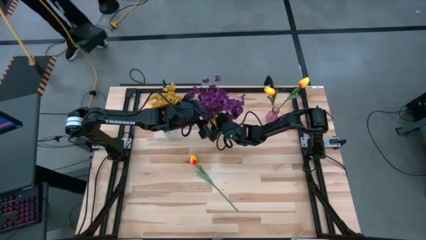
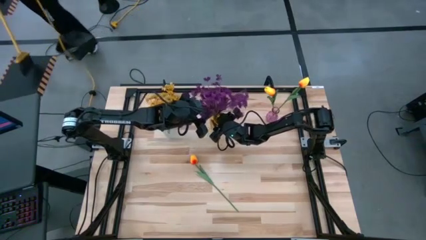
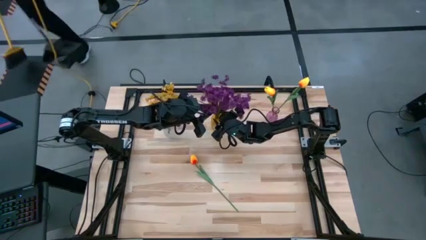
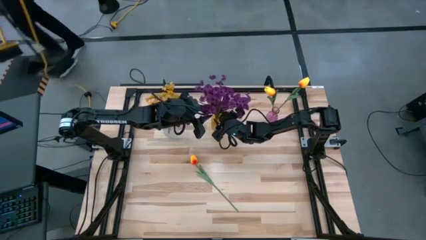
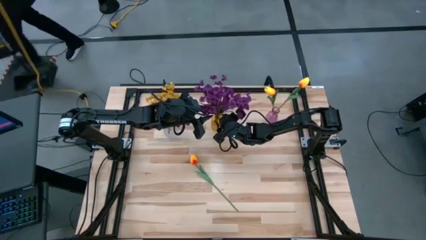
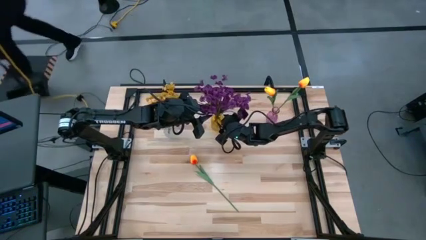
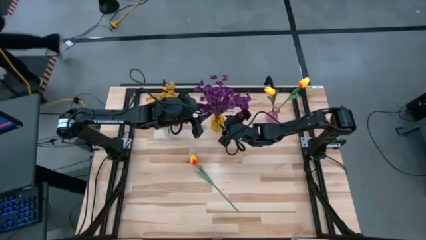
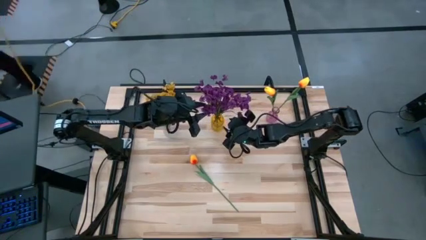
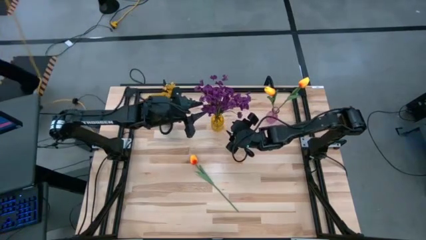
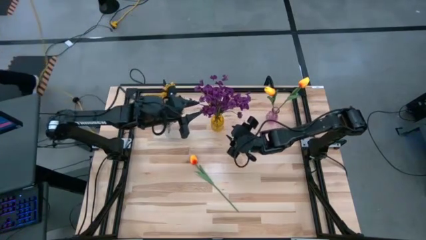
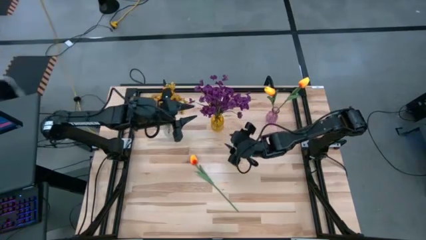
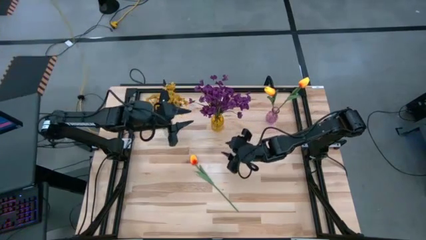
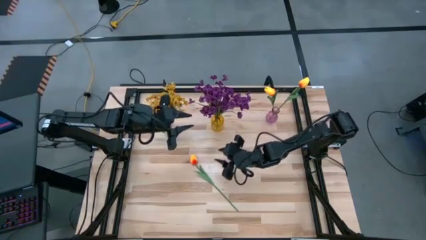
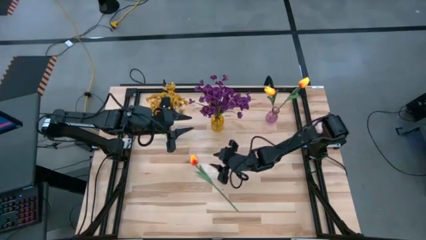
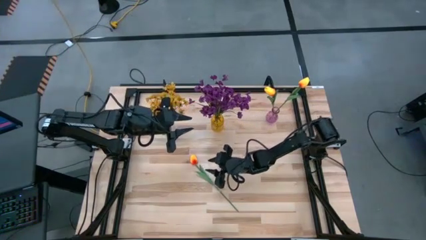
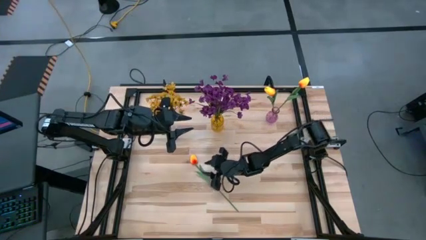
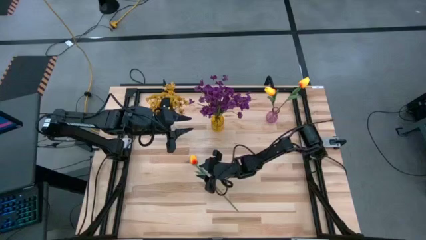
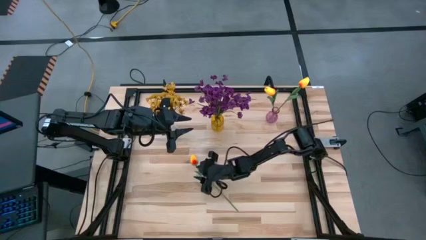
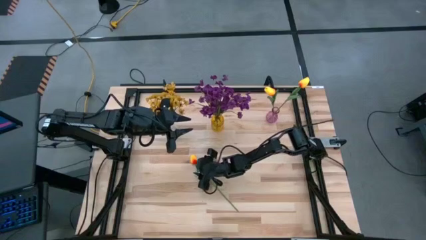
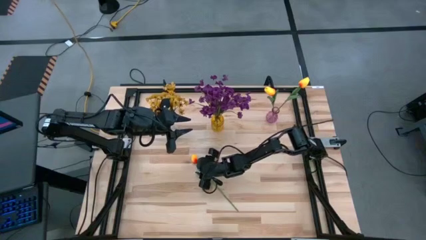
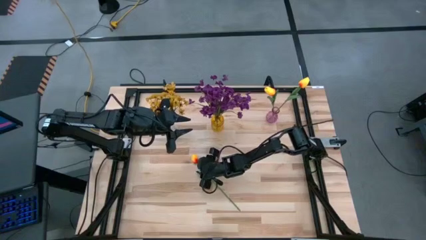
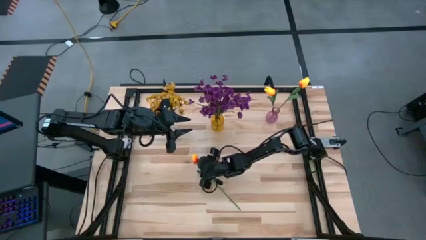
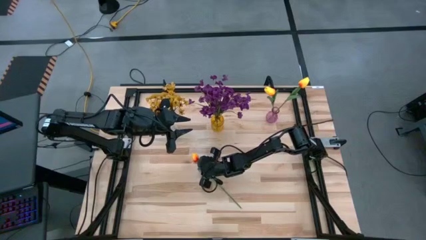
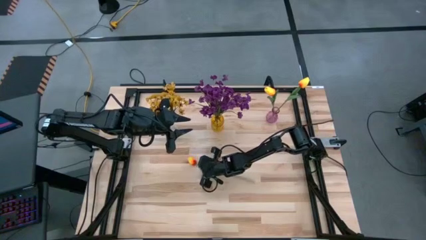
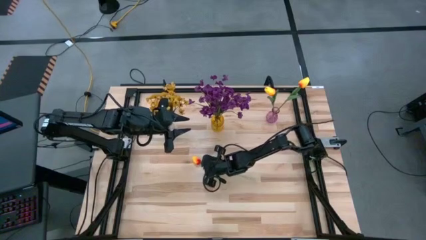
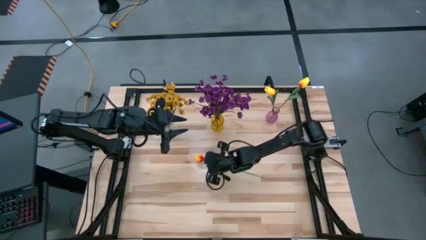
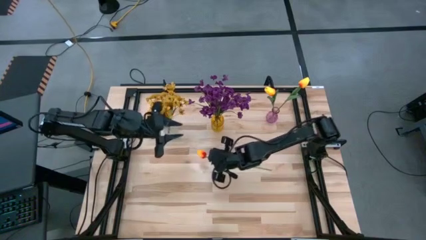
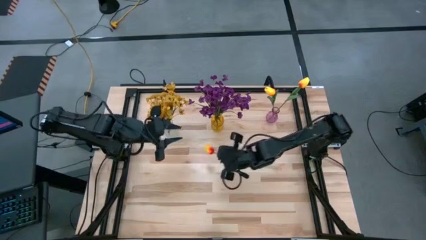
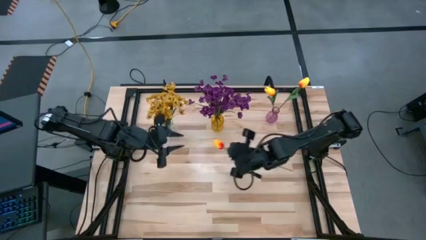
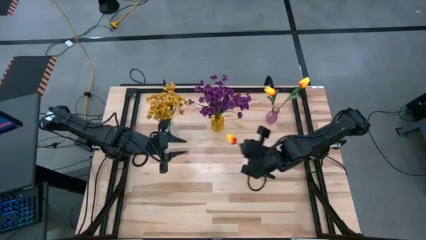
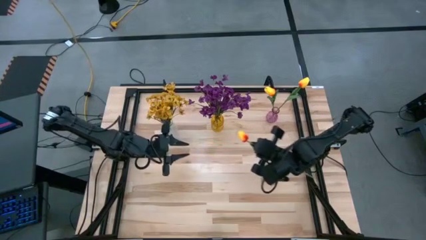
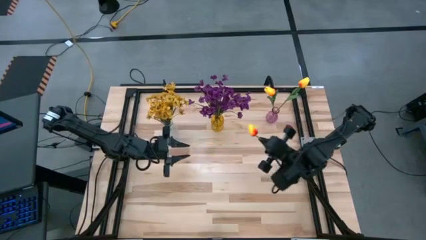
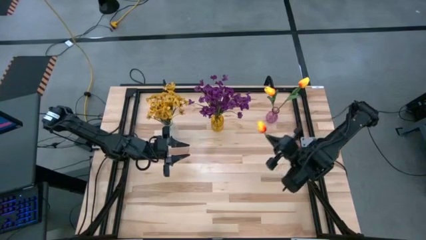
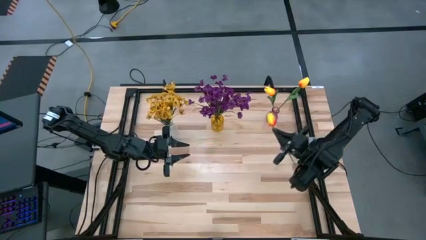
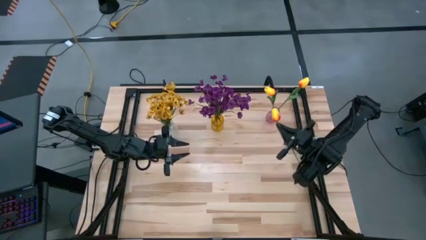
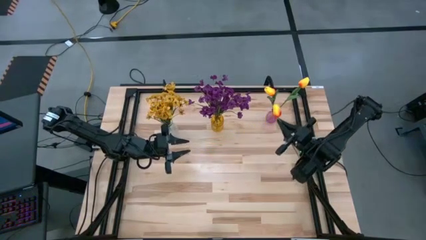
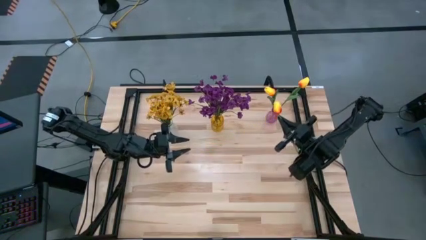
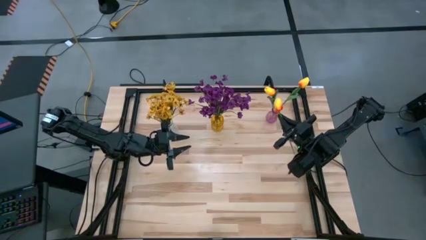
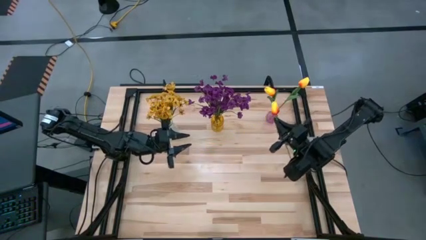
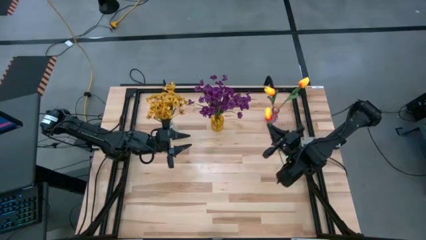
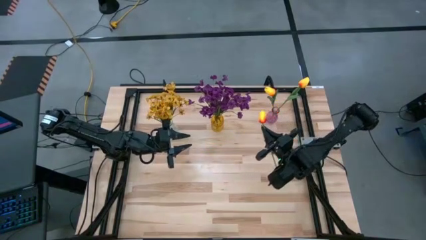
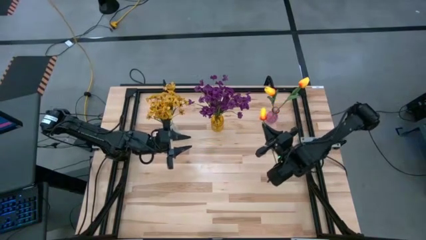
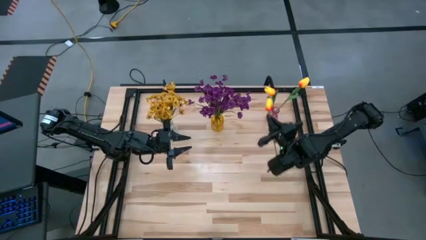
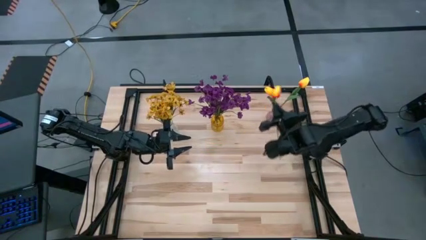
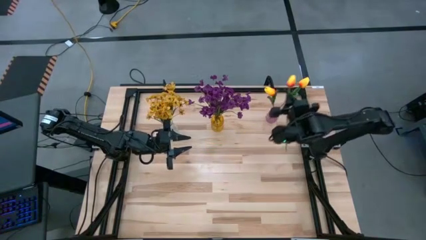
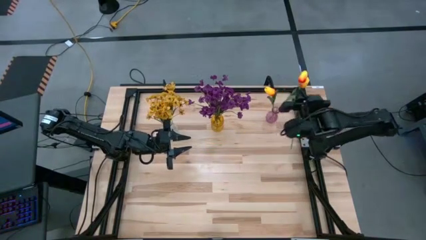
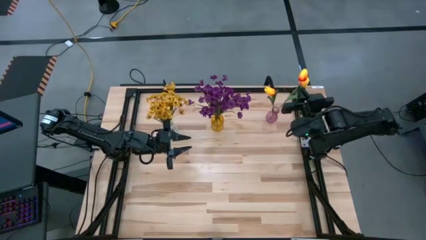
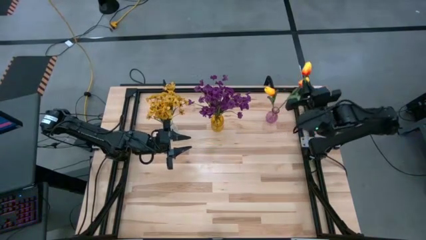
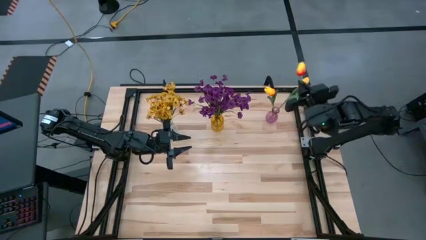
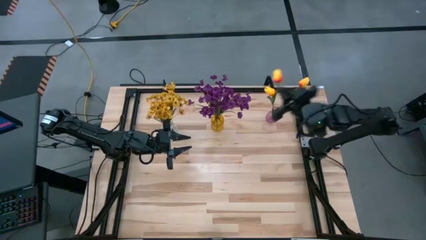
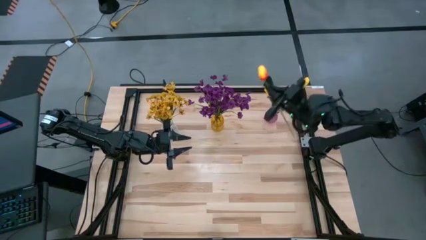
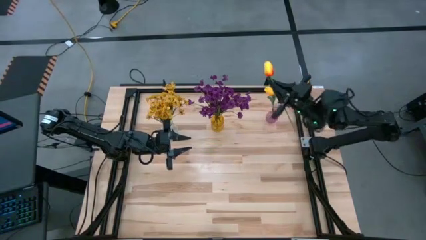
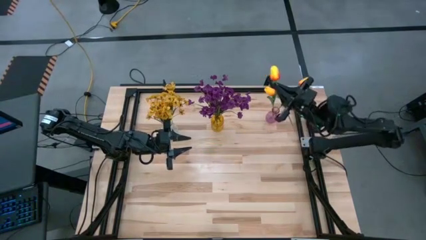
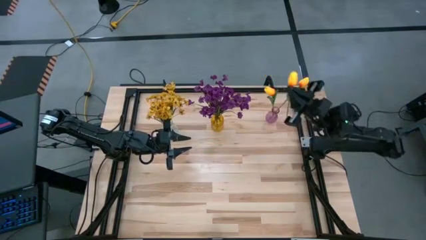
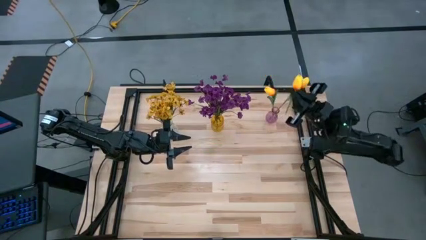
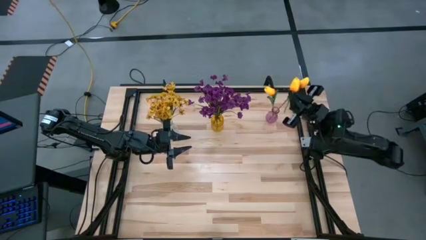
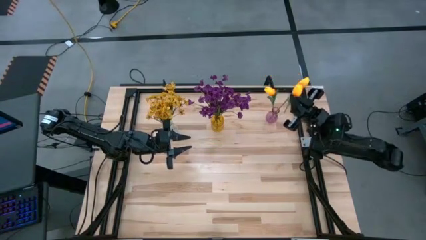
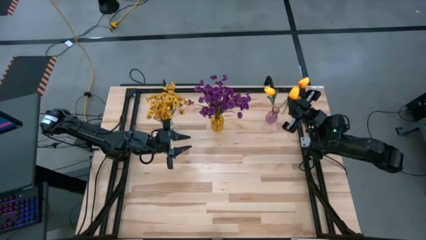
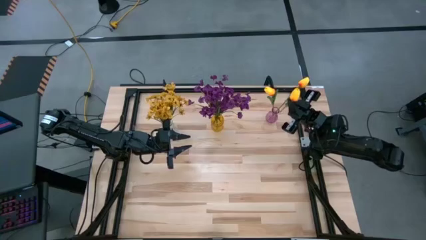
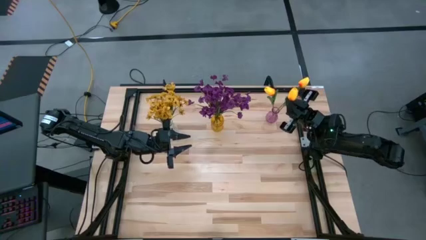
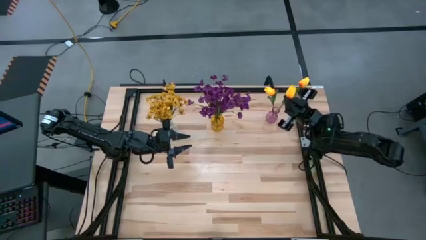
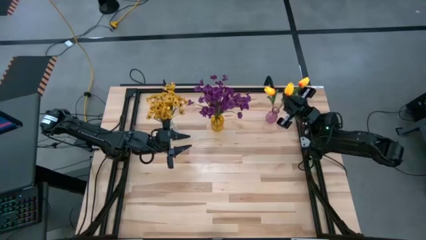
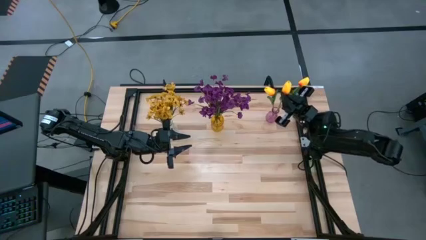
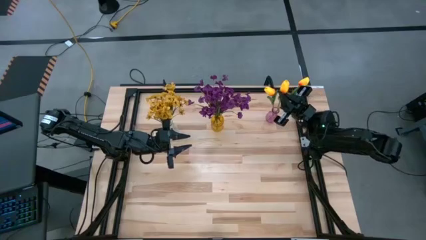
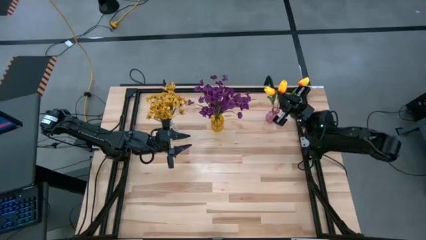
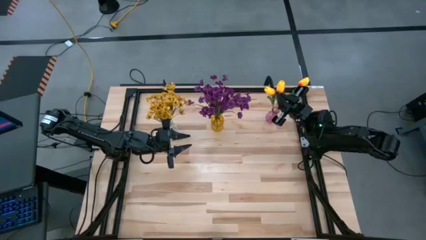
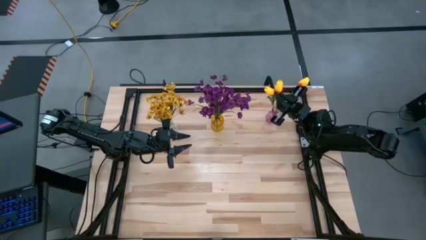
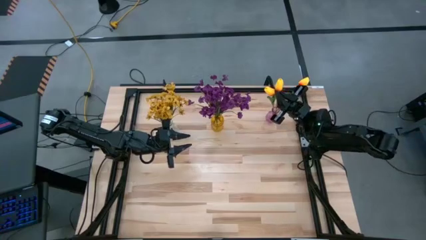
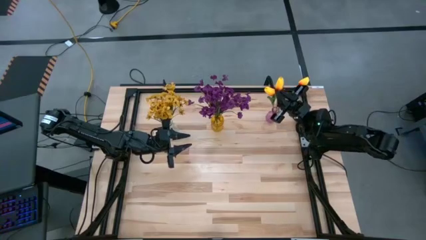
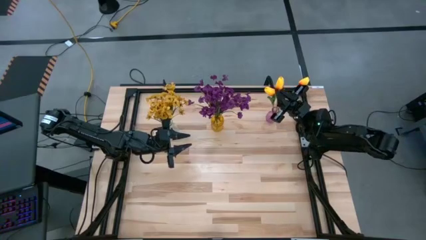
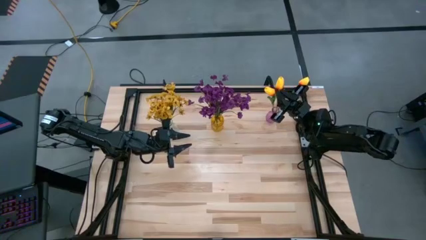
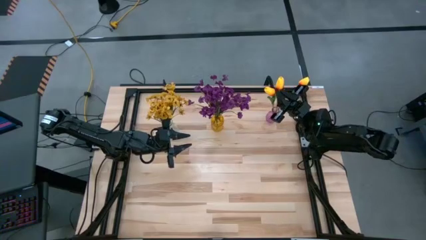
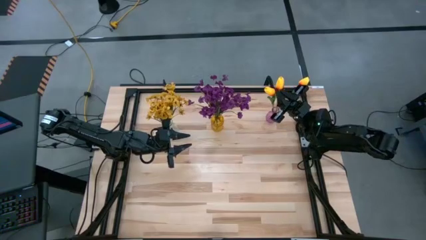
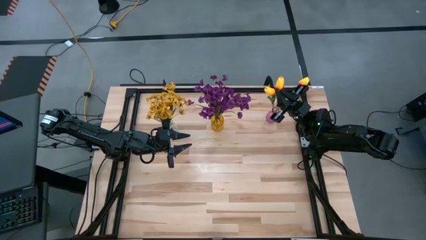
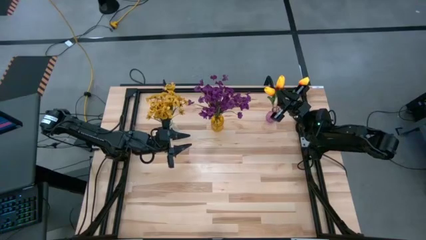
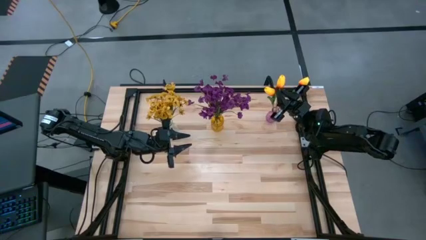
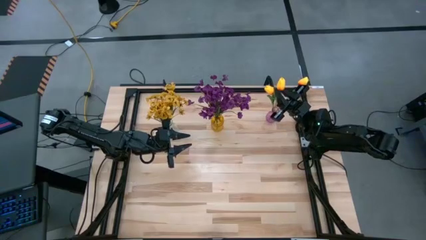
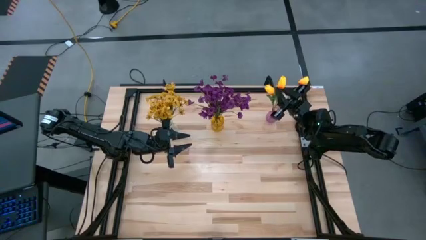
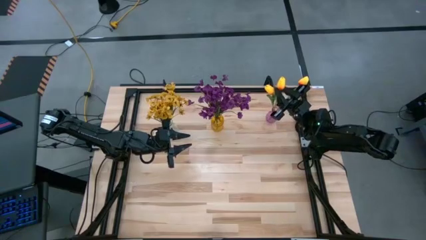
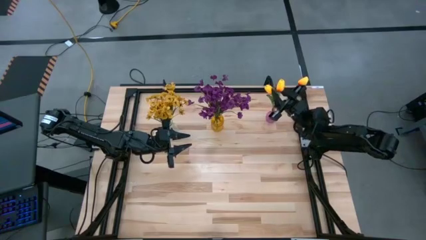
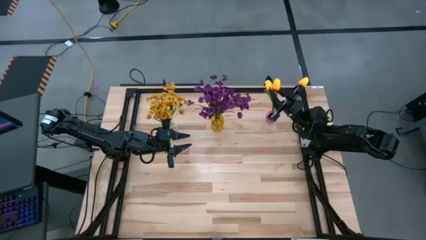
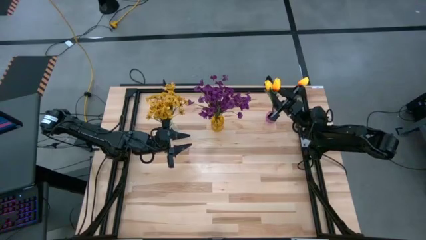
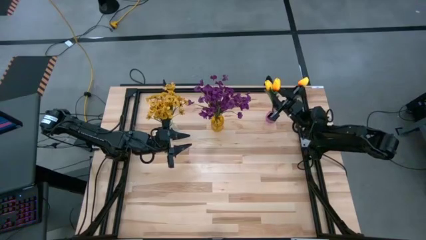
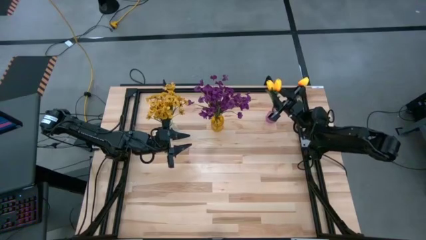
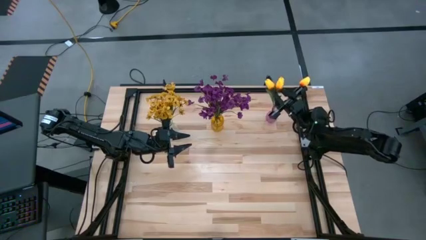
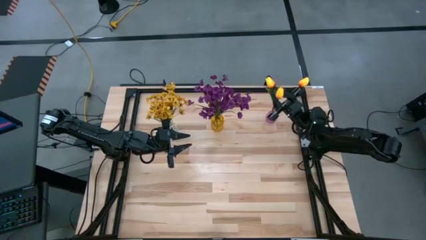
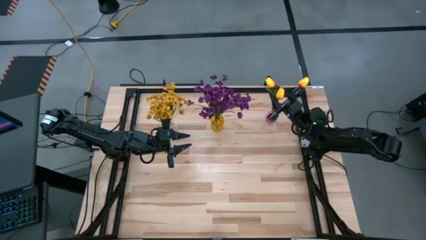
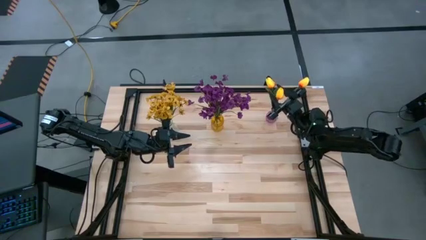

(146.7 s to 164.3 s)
Task: Sort flowers into vase by color
Put the orange flower into the purple vase
